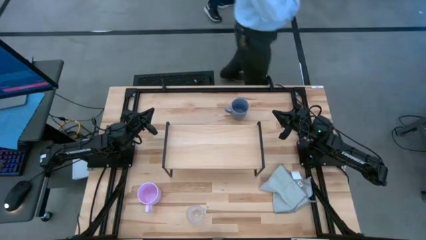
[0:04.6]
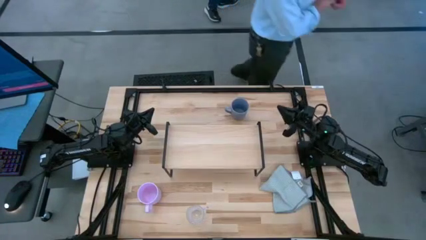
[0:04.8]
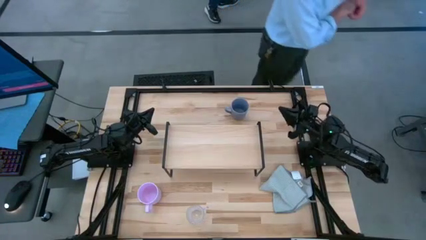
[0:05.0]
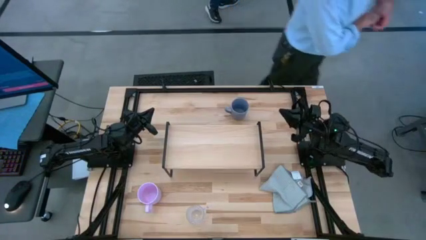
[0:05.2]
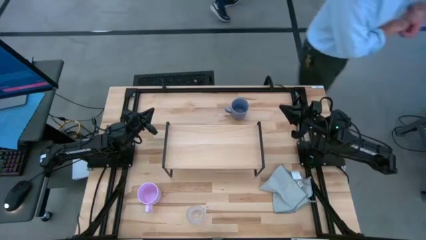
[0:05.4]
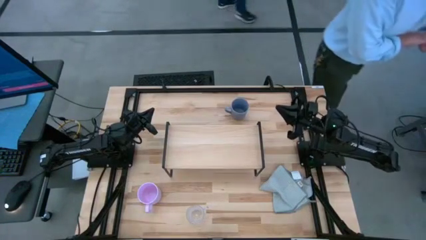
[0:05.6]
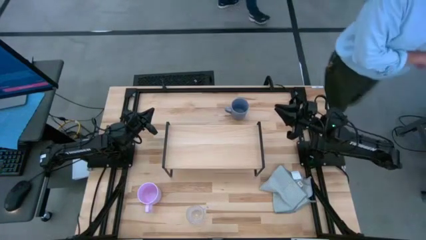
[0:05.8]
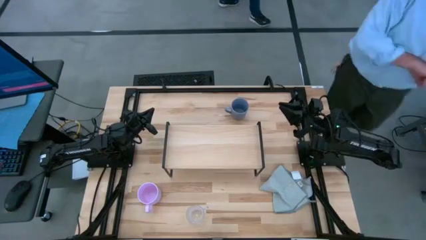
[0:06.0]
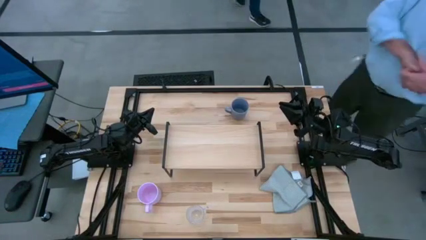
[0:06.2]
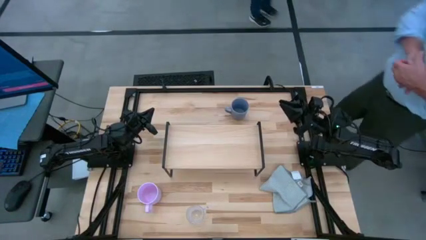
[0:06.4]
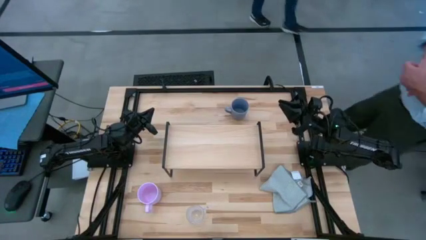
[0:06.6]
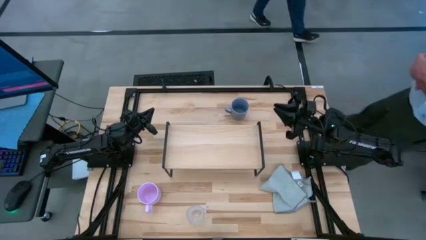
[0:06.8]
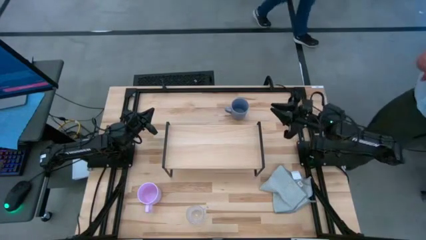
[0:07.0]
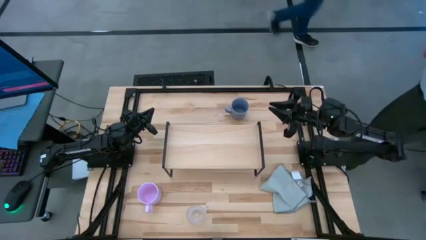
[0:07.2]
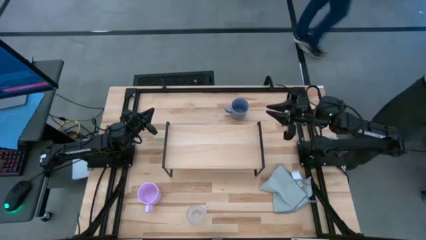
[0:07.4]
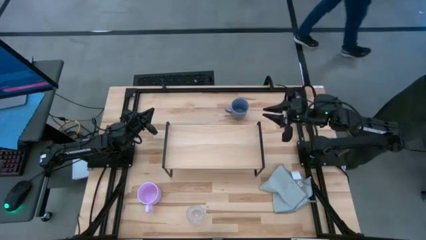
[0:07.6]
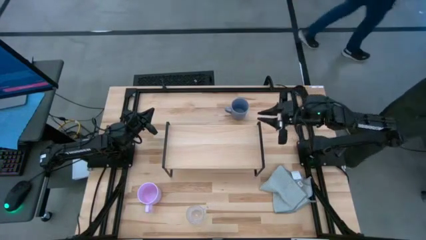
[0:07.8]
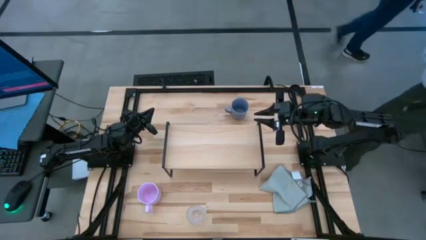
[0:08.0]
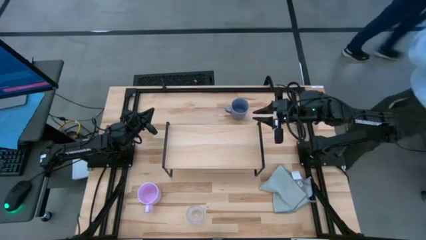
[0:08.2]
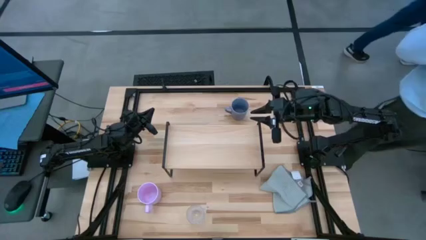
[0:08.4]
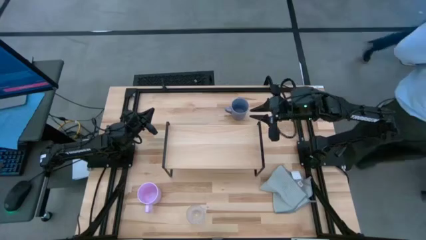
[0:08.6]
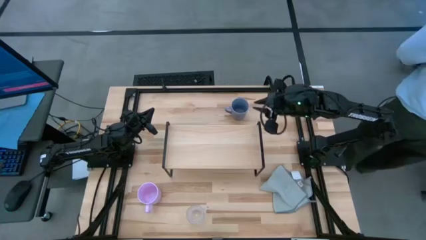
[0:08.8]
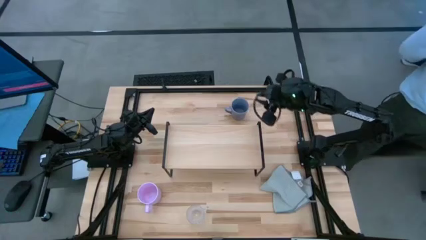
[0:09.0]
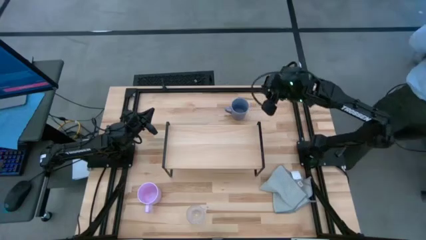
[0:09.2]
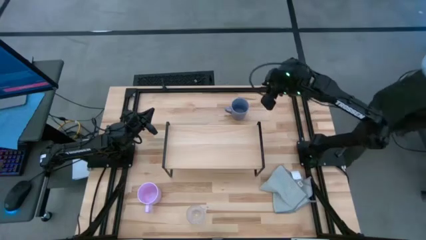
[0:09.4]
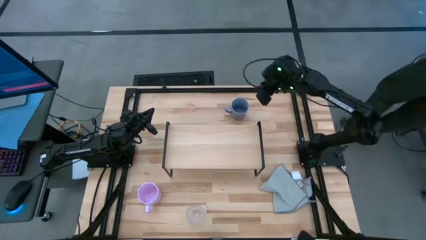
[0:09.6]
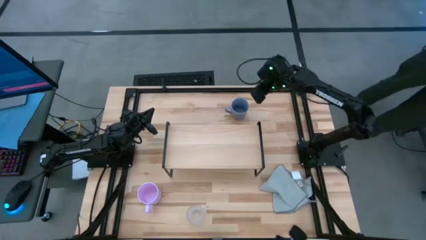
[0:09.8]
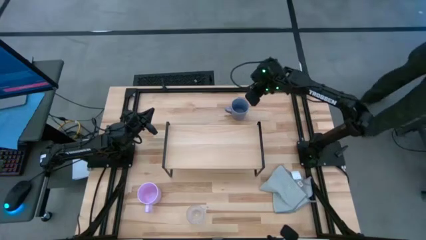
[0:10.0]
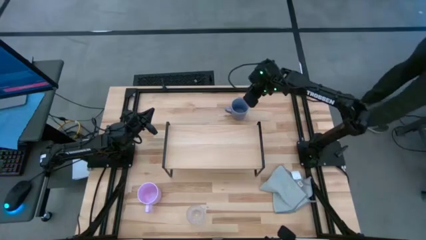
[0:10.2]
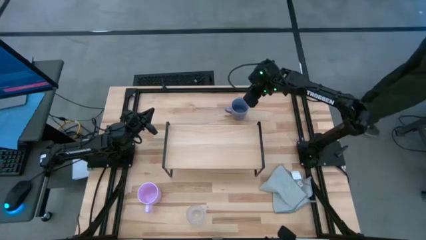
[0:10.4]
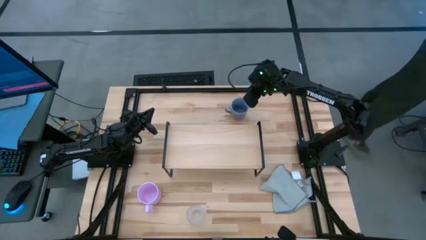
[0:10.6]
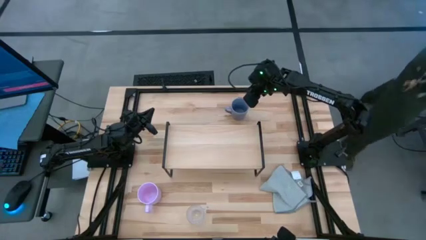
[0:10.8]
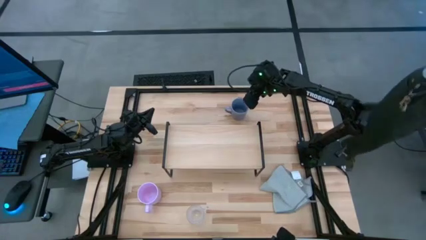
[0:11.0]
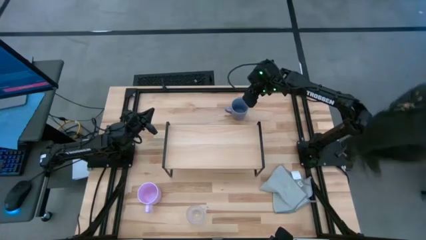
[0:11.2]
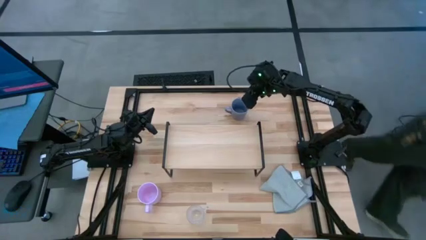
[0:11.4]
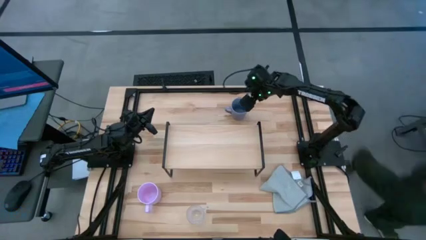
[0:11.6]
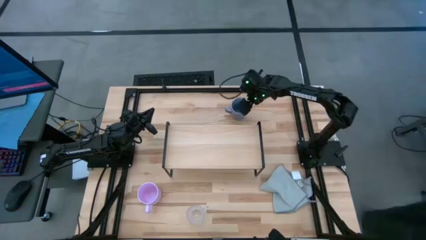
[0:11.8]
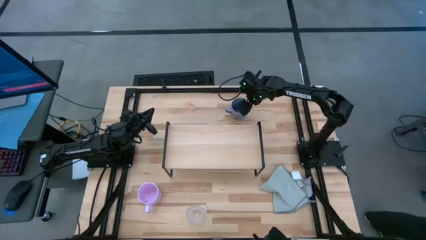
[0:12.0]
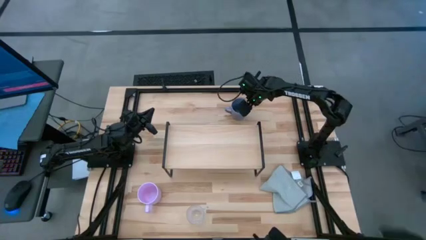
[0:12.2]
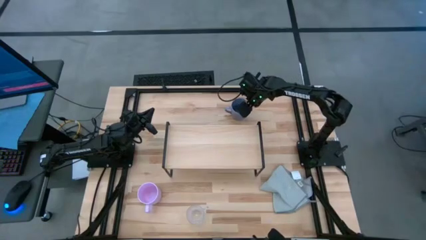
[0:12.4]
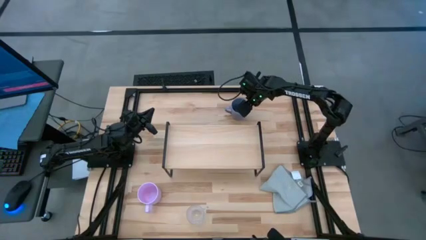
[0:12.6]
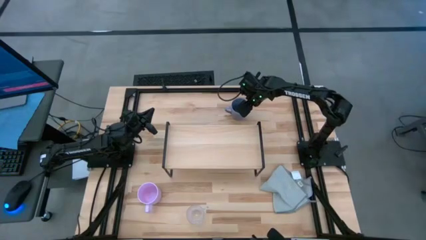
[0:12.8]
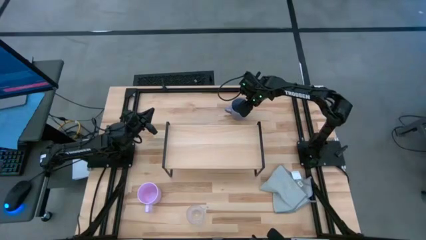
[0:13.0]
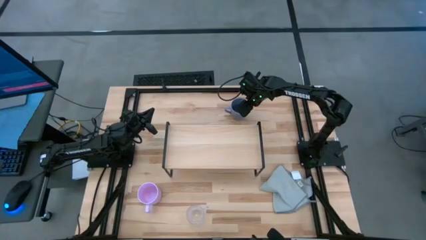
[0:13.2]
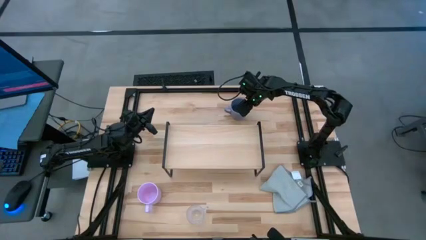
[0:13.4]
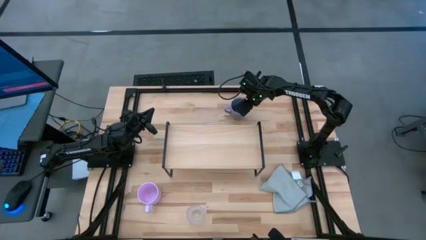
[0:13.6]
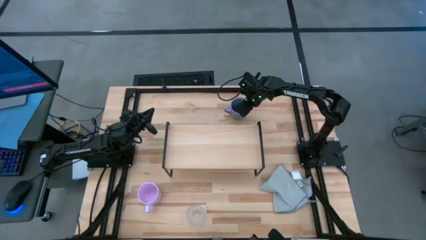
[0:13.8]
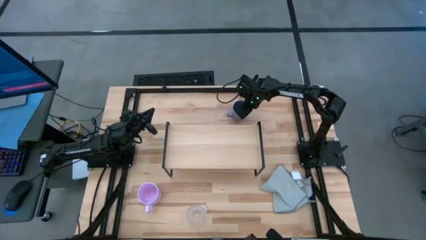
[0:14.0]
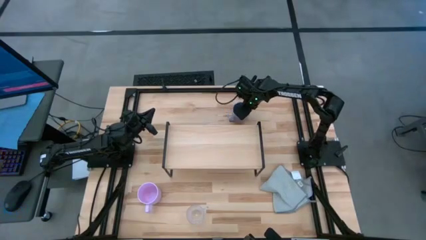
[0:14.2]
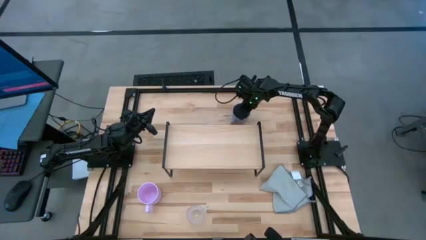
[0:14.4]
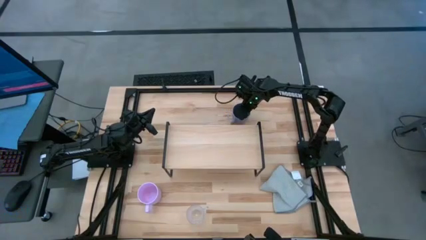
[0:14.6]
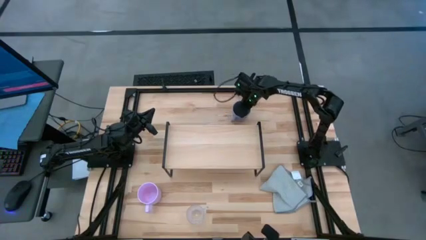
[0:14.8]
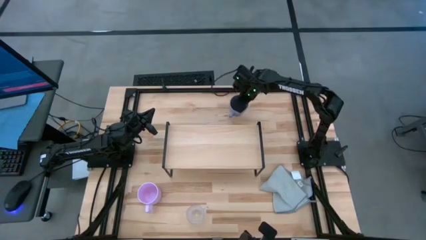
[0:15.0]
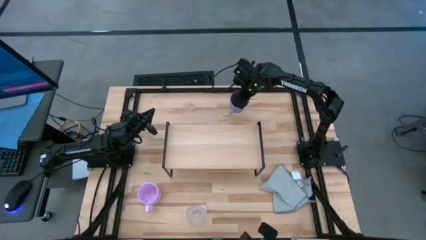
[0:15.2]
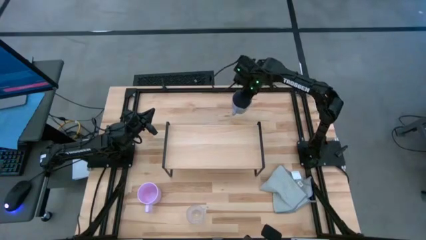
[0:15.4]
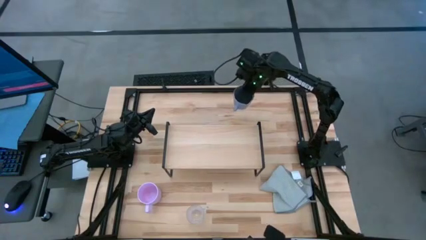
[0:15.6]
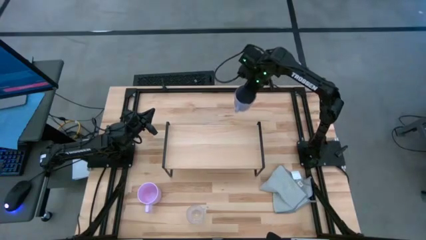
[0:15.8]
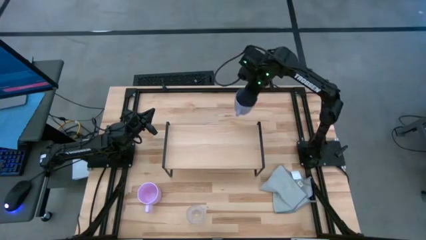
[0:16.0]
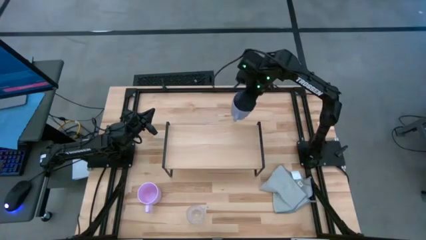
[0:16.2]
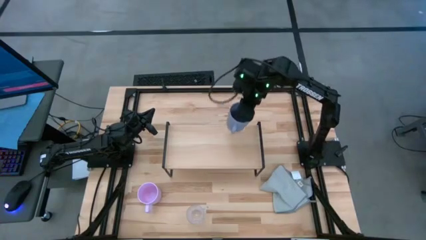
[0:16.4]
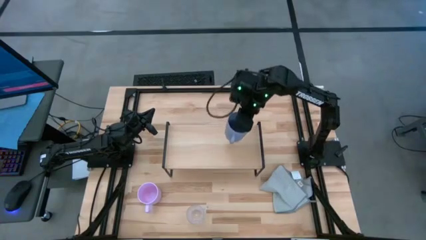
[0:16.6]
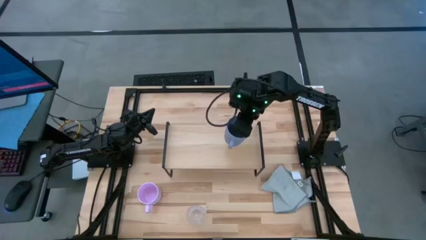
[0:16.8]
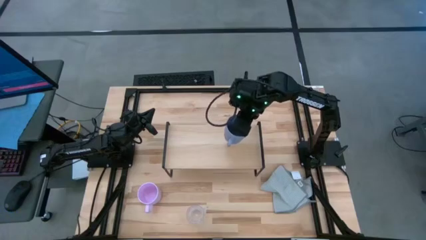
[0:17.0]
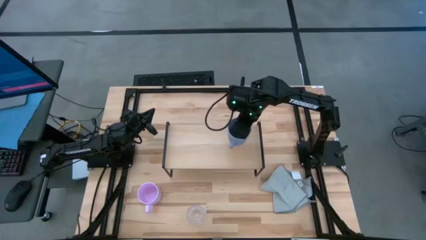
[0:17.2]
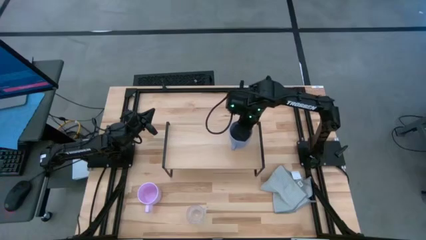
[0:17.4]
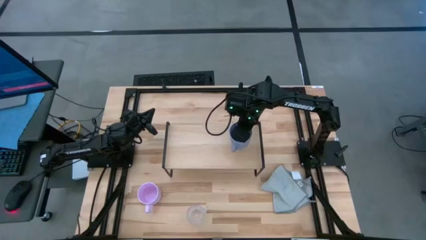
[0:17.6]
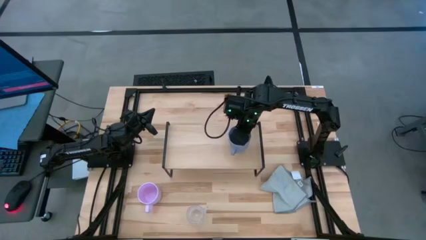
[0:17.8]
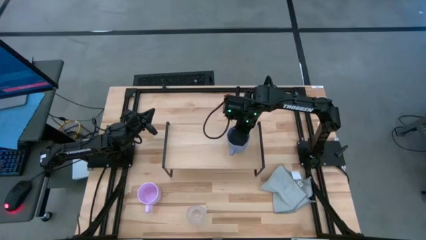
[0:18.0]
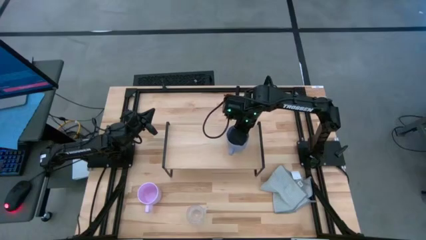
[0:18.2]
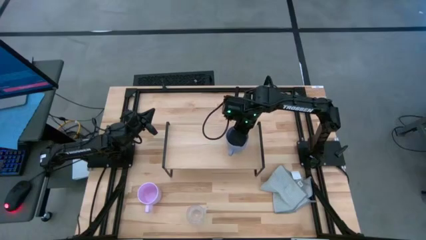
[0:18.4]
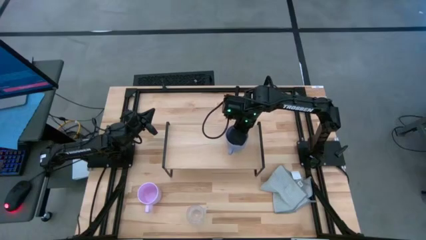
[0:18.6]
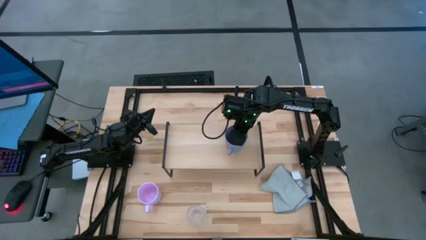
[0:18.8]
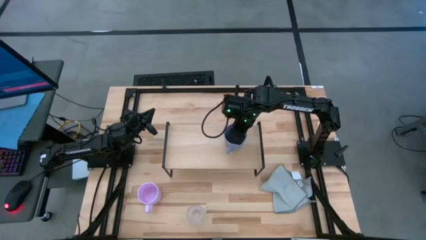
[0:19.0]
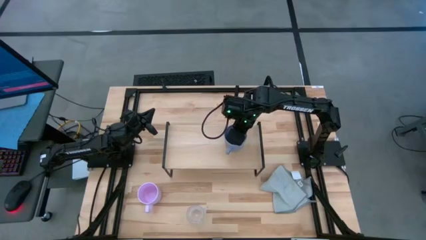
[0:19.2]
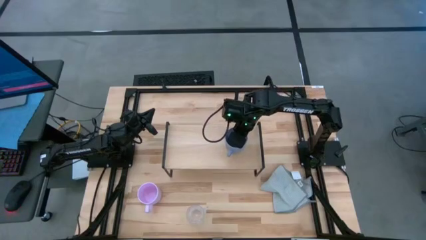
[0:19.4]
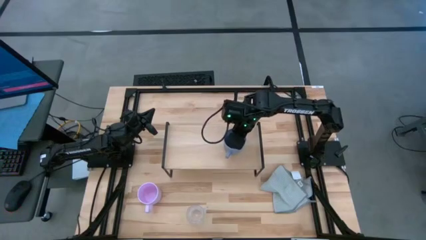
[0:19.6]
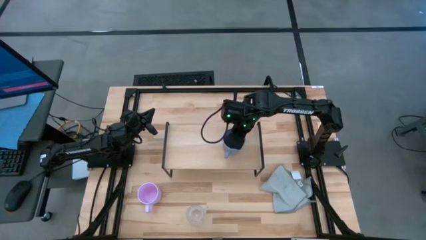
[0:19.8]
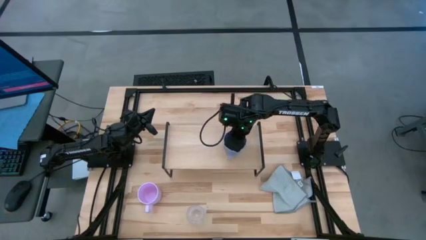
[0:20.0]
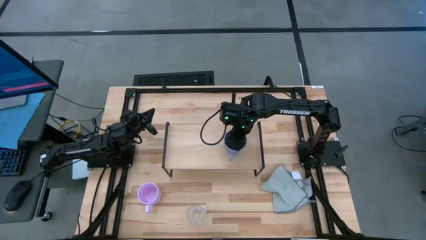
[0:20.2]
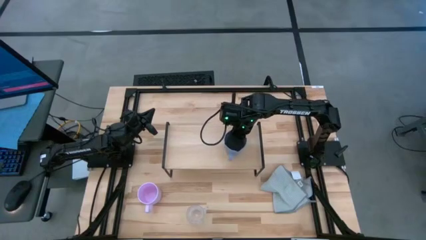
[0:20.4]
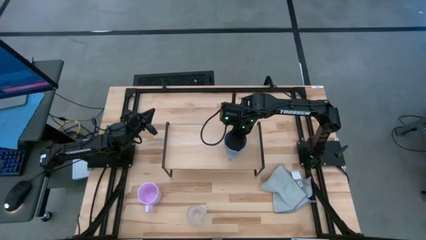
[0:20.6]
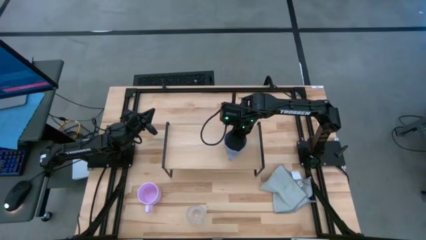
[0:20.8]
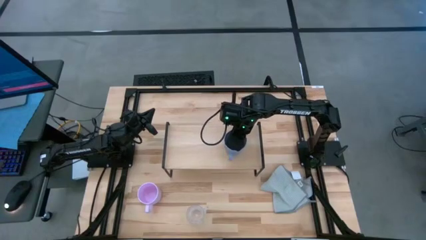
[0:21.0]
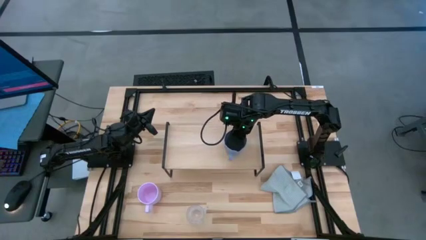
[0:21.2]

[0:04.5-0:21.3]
Task: Stack small to large cups/mugs on shelf
Put the blue mug on the shelf
